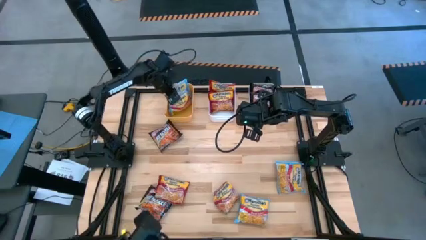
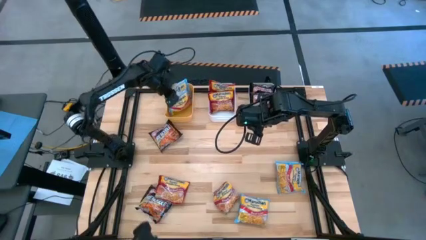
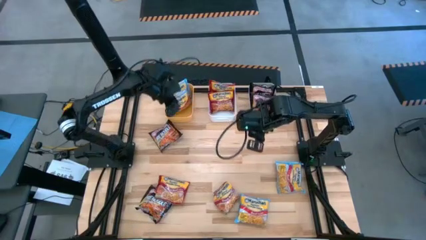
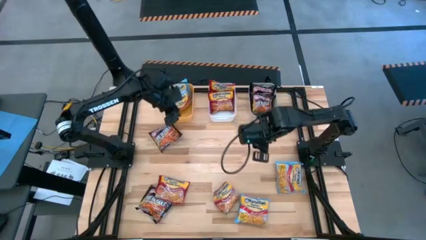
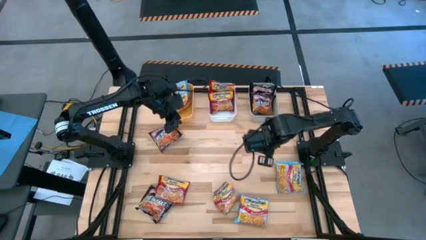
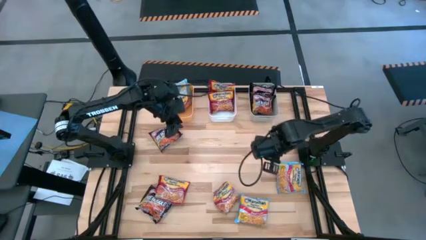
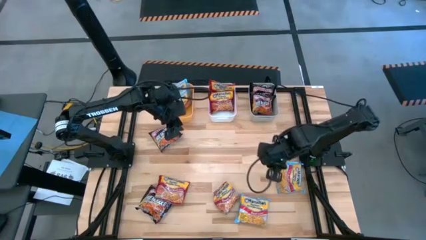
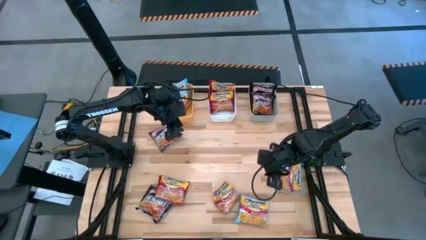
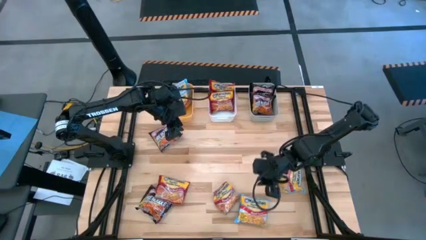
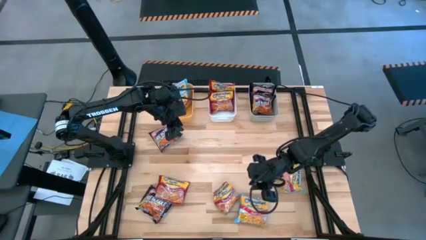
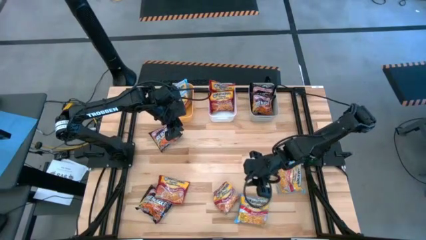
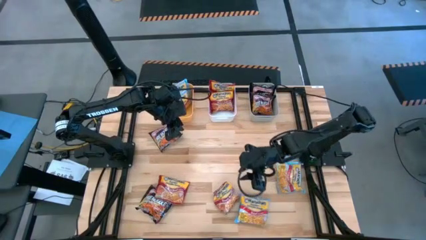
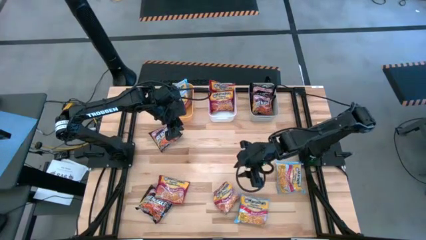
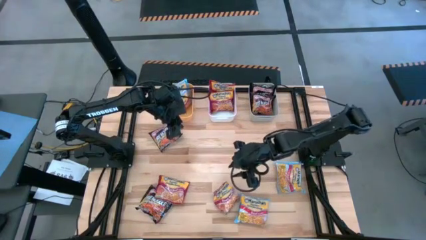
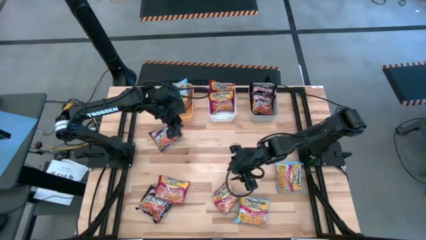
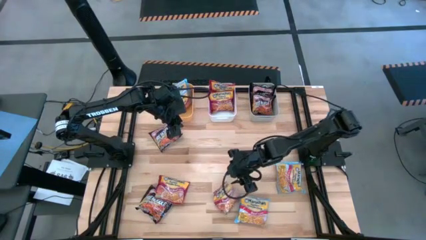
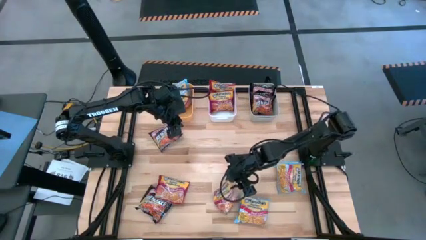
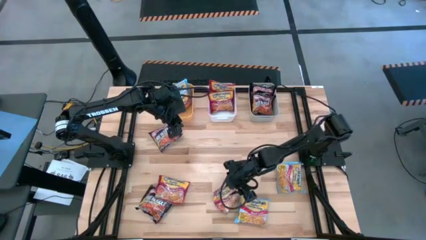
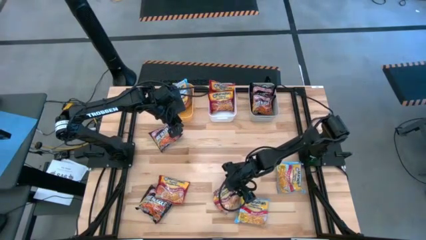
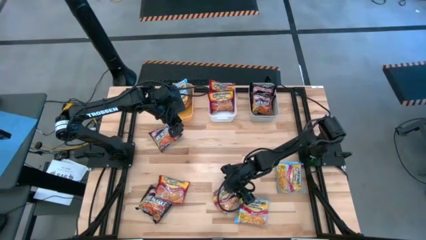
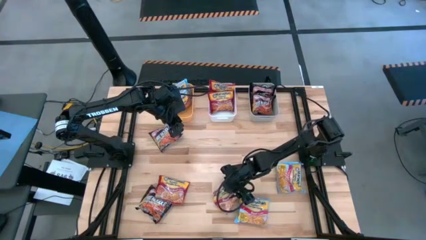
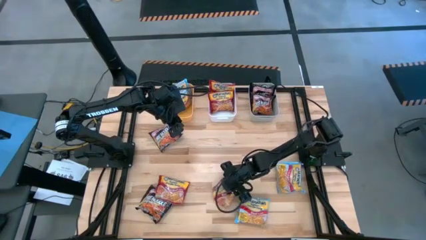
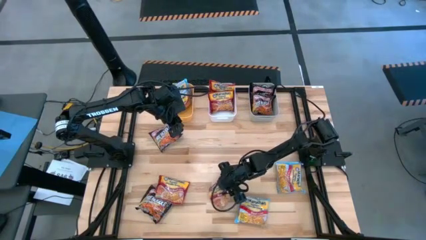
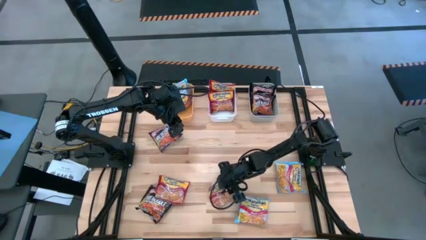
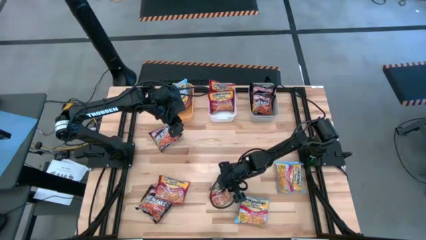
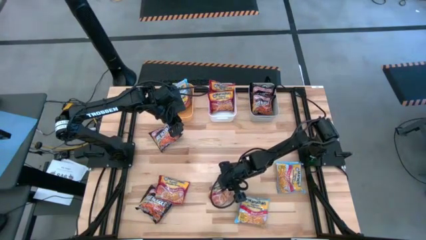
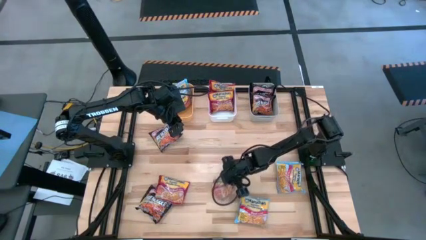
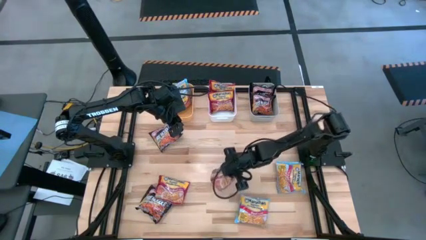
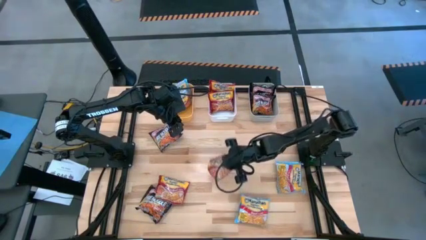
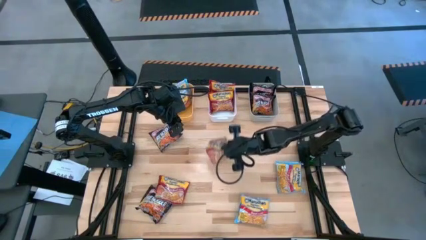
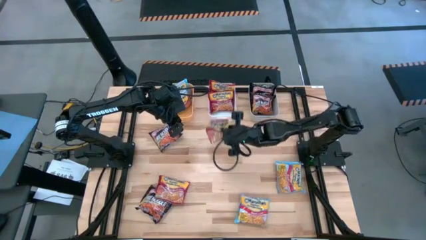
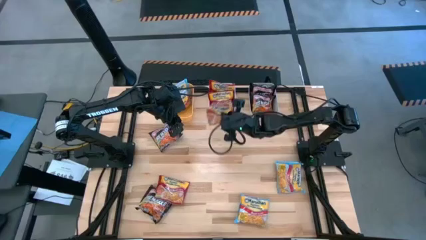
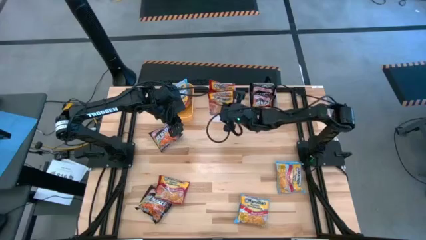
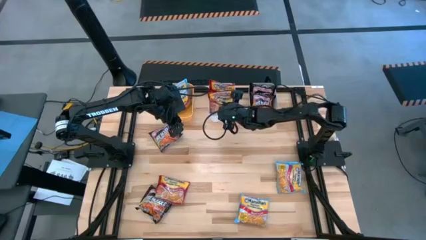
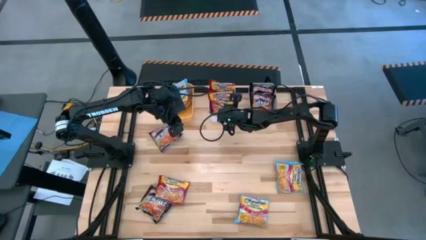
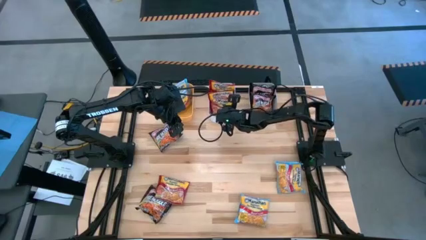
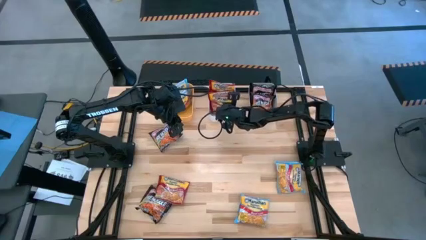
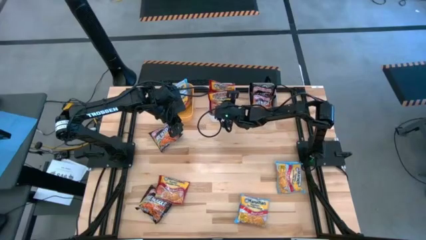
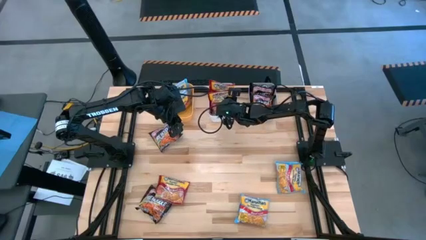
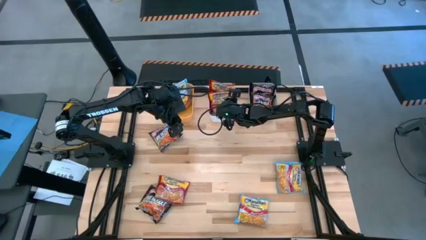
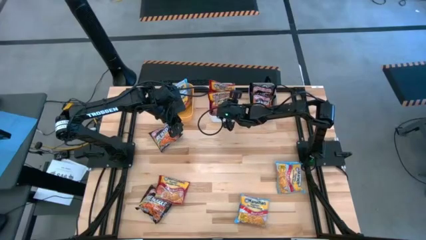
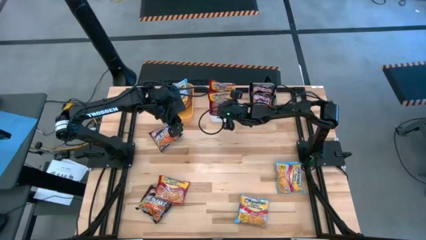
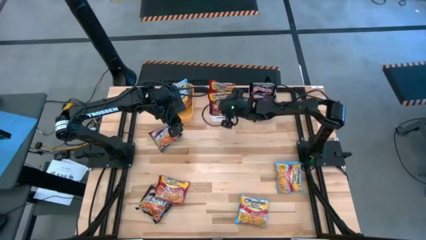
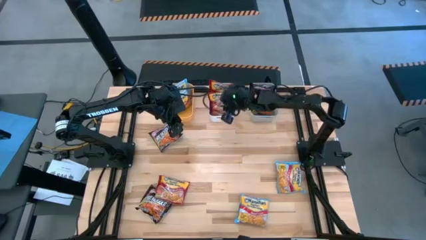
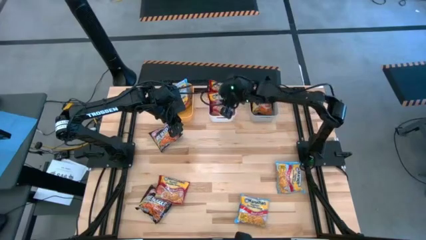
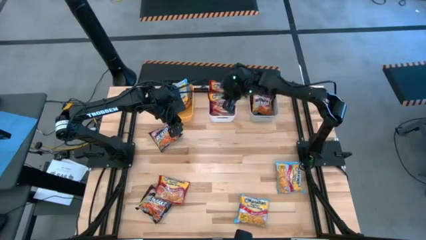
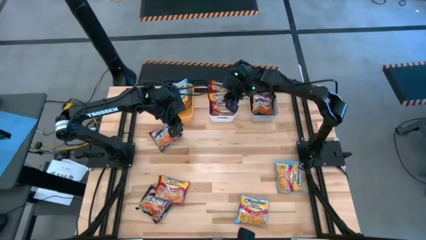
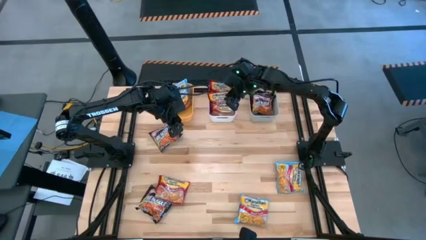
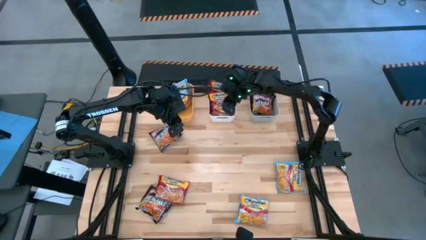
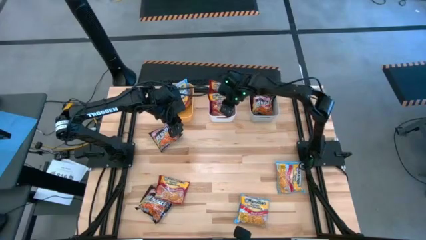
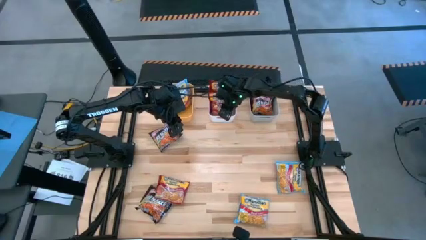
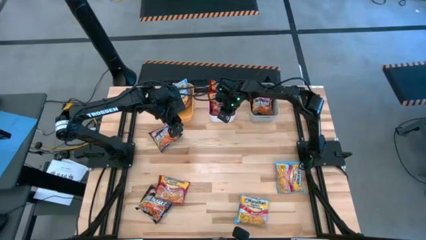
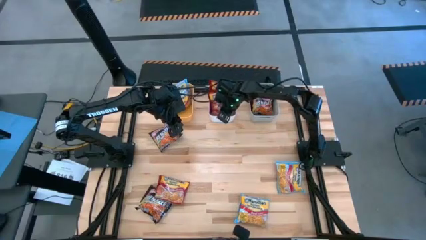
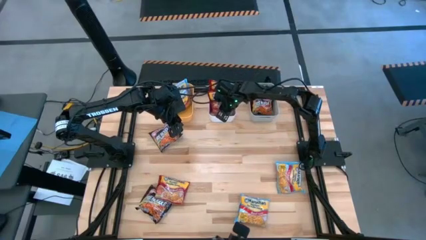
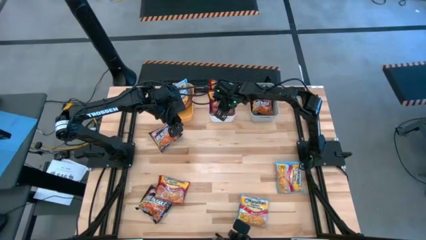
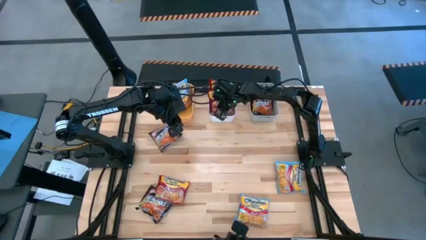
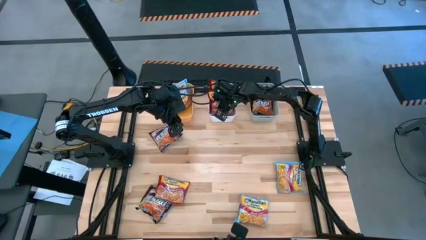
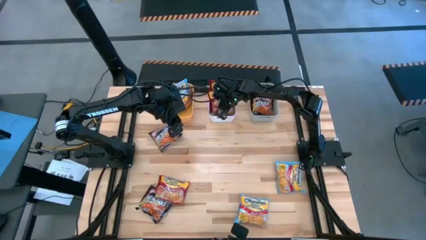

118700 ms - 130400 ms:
Task: Sort Maruchan noodles
Put the red noodle pack into the white bin

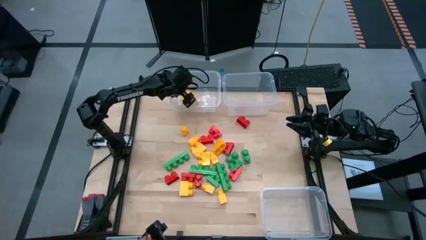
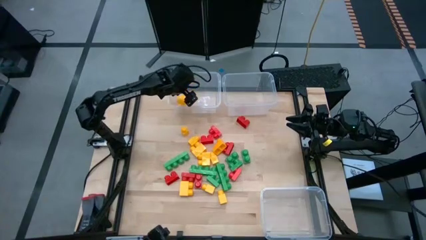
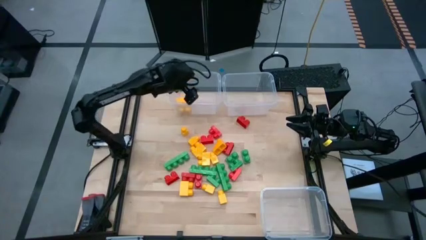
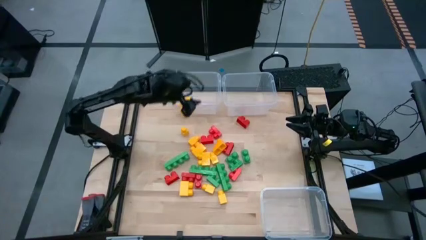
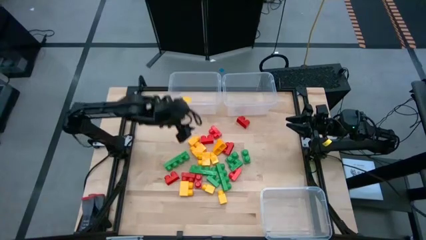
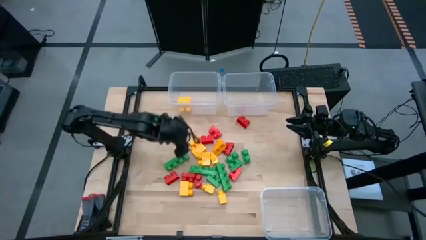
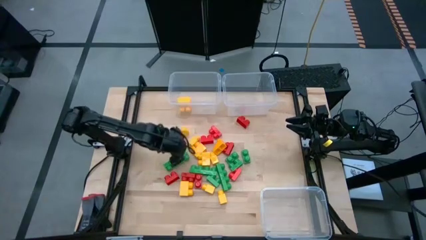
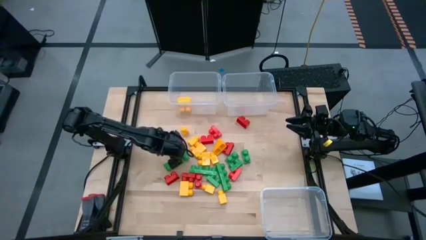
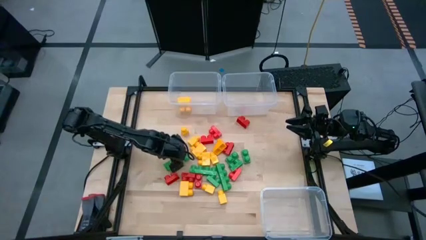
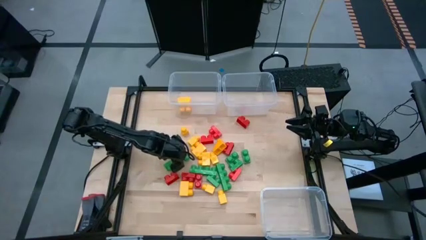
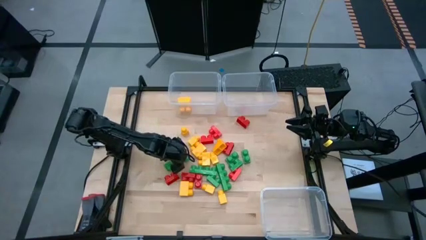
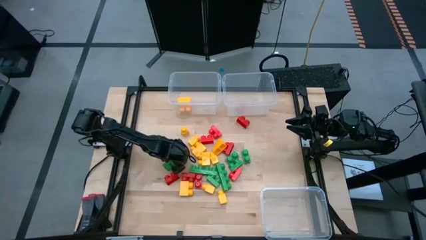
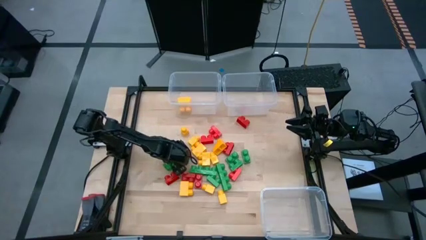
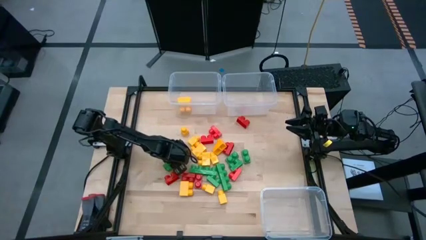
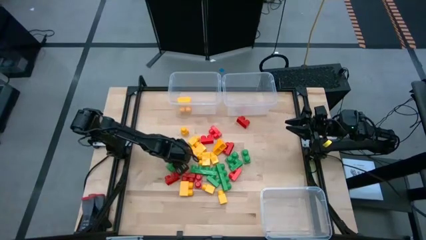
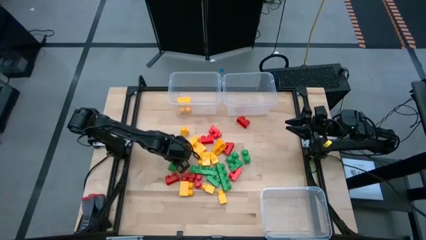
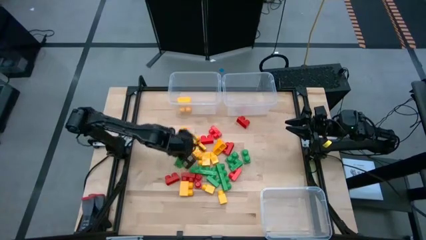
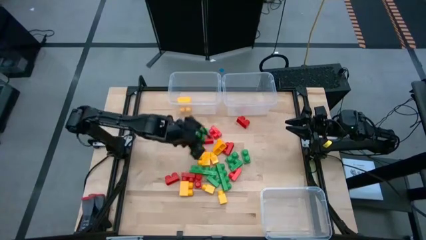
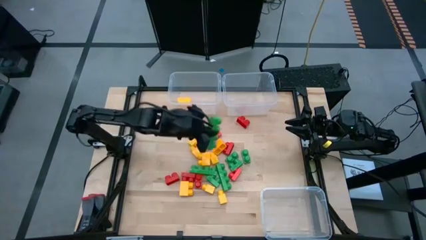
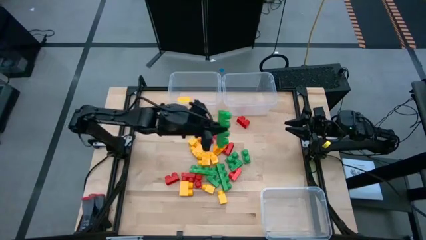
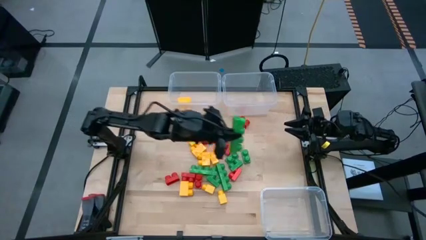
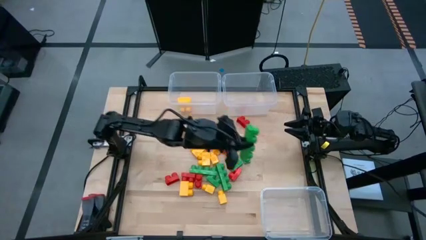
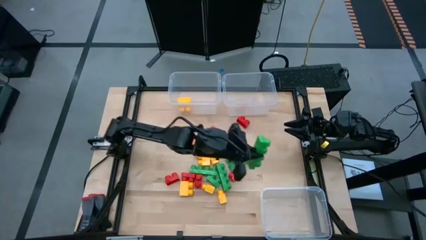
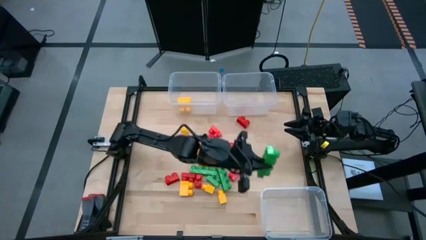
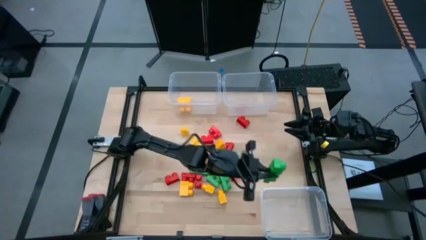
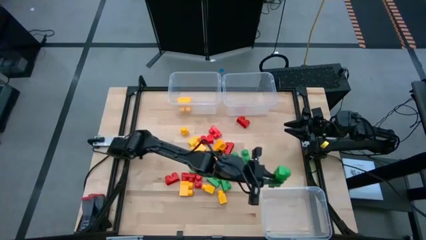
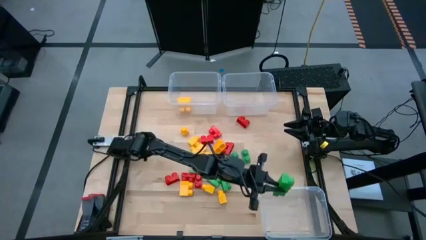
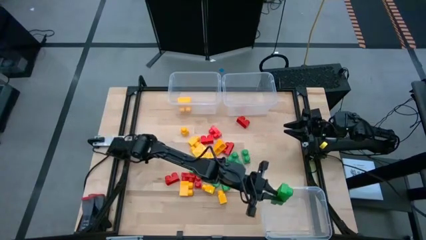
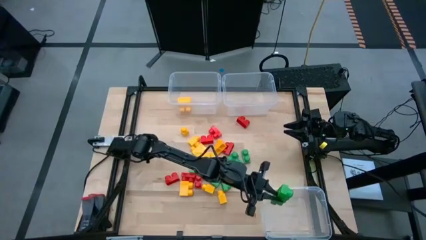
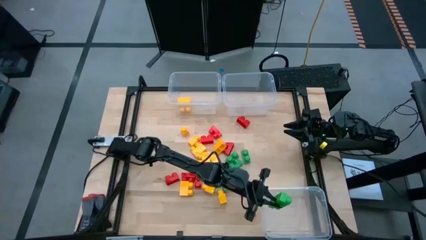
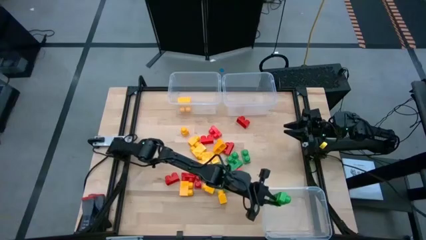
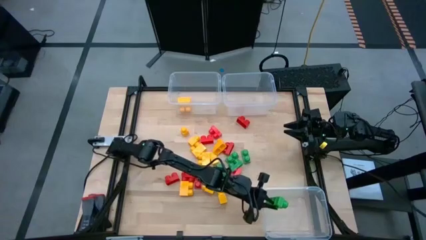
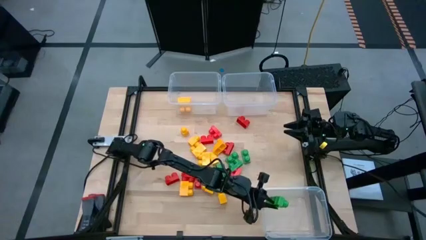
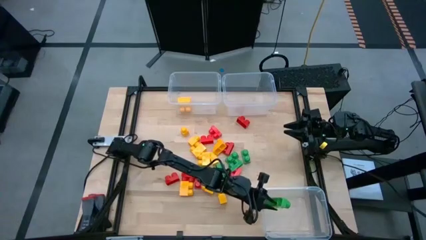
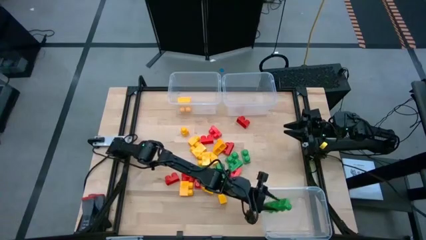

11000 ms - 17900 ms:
Task: Sort blocks
Put the green game piece into the bottom right transparent bin
